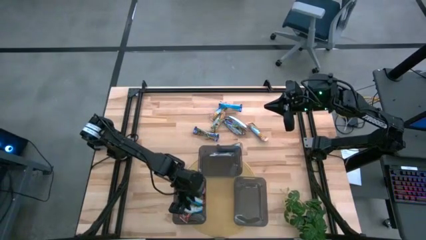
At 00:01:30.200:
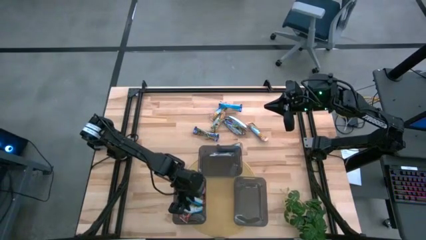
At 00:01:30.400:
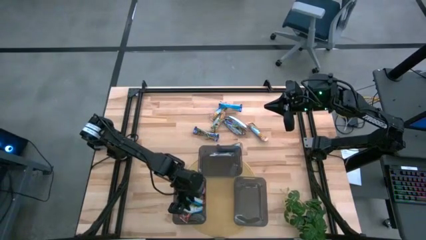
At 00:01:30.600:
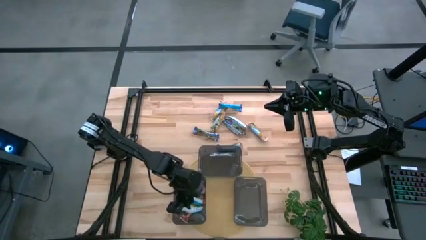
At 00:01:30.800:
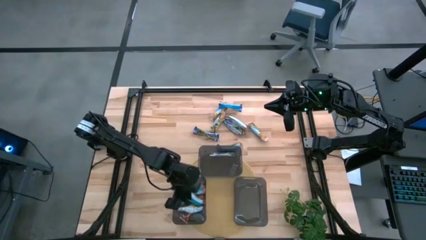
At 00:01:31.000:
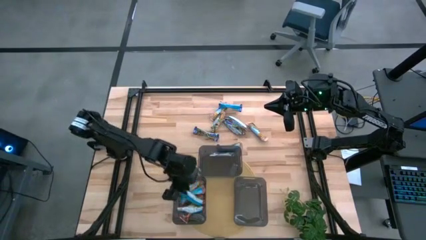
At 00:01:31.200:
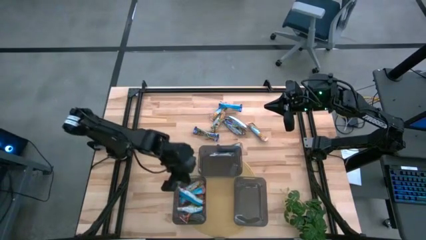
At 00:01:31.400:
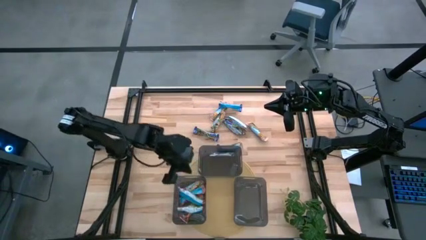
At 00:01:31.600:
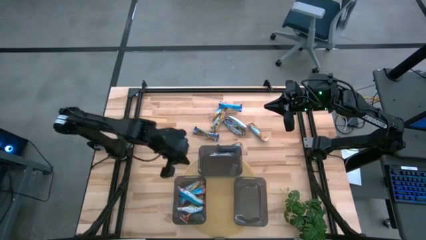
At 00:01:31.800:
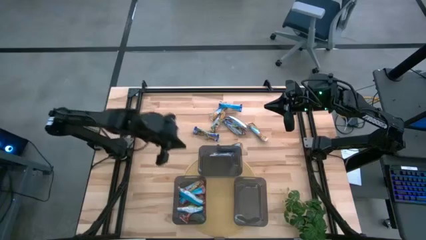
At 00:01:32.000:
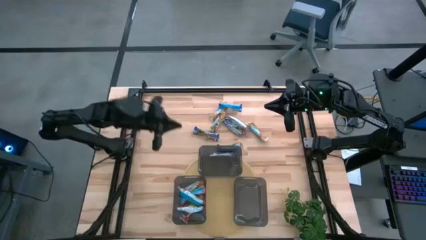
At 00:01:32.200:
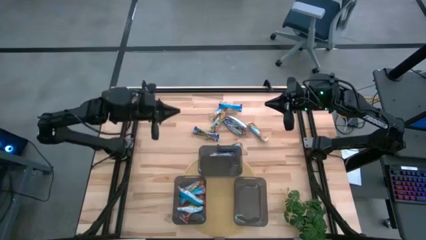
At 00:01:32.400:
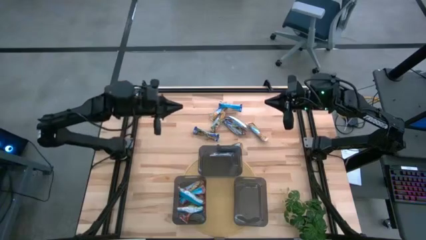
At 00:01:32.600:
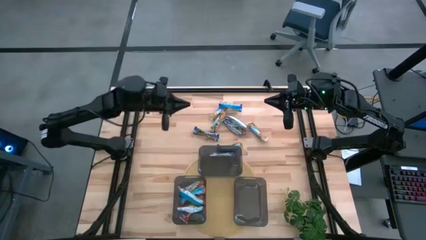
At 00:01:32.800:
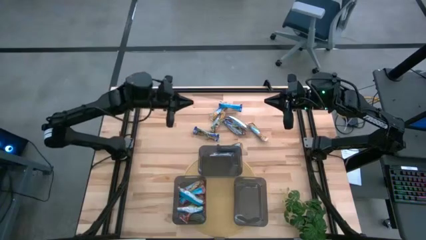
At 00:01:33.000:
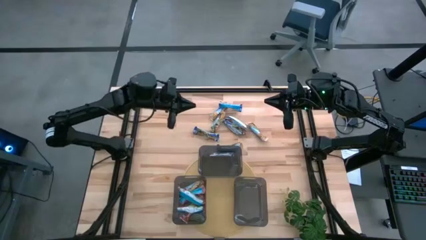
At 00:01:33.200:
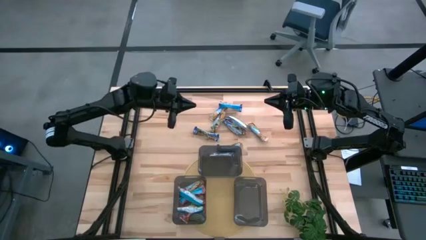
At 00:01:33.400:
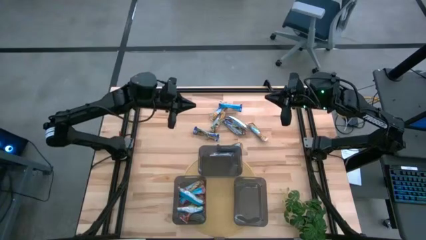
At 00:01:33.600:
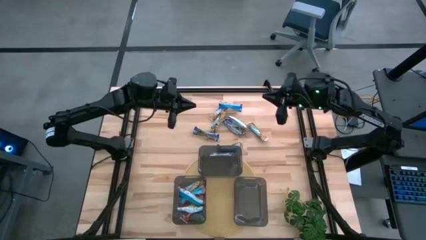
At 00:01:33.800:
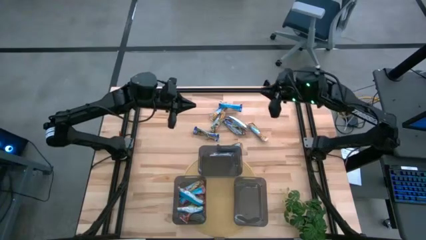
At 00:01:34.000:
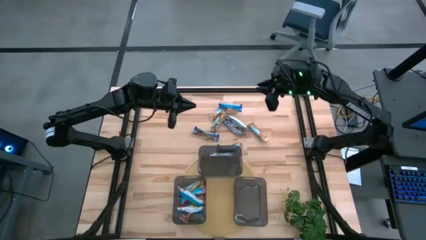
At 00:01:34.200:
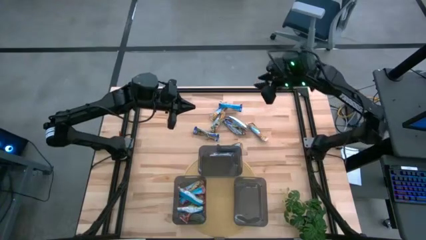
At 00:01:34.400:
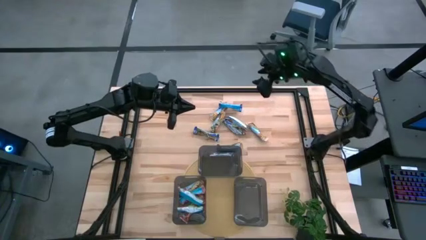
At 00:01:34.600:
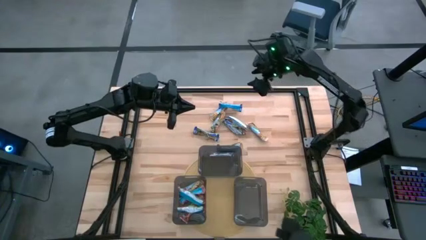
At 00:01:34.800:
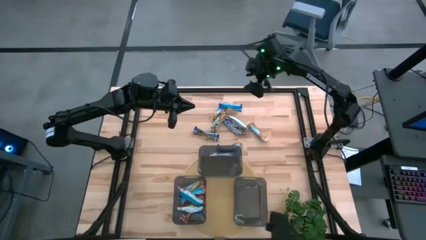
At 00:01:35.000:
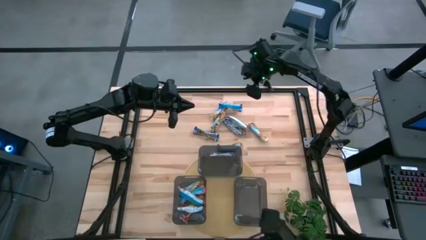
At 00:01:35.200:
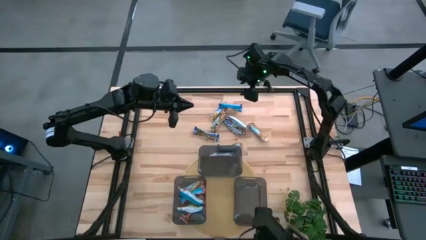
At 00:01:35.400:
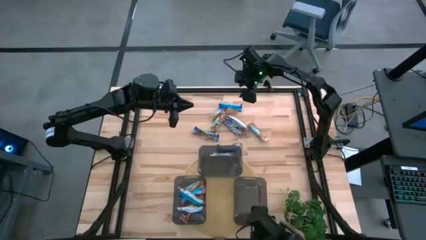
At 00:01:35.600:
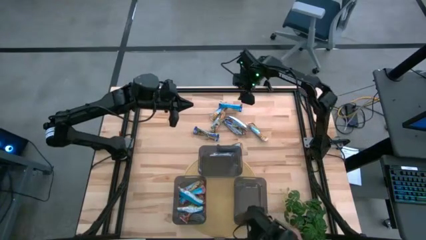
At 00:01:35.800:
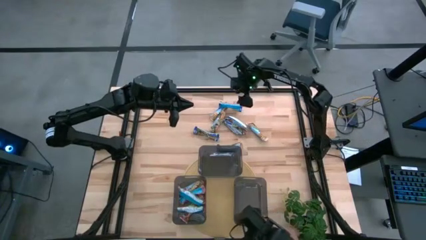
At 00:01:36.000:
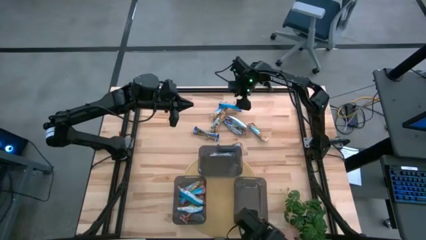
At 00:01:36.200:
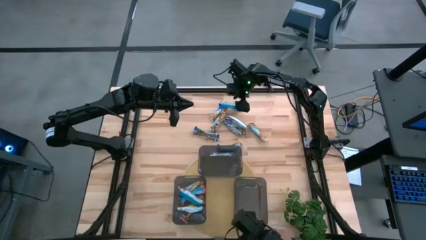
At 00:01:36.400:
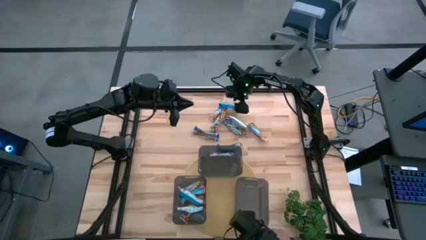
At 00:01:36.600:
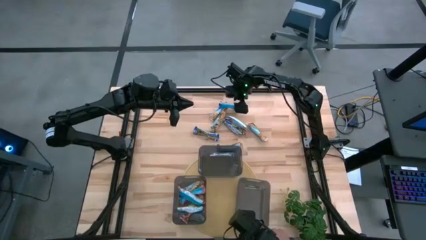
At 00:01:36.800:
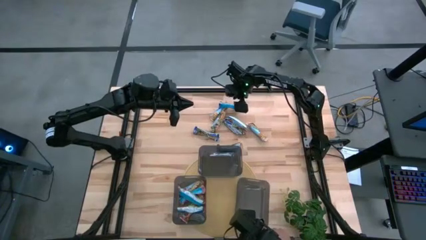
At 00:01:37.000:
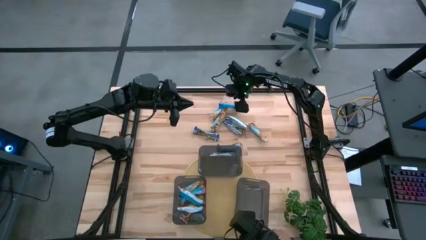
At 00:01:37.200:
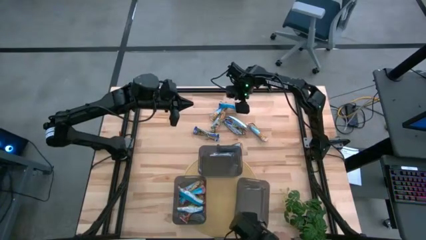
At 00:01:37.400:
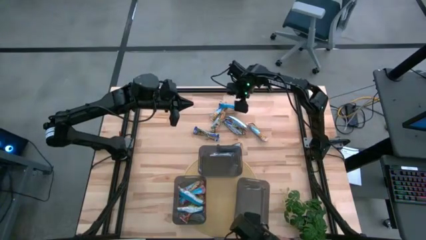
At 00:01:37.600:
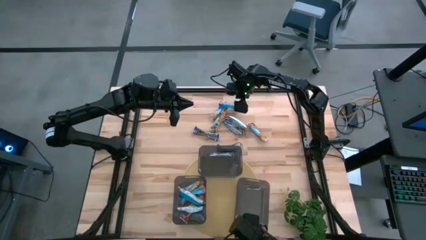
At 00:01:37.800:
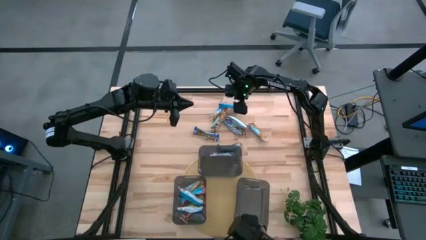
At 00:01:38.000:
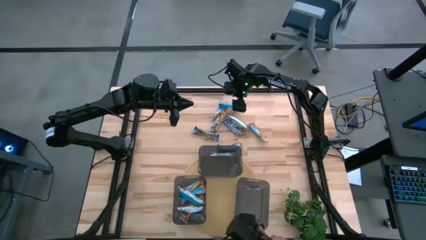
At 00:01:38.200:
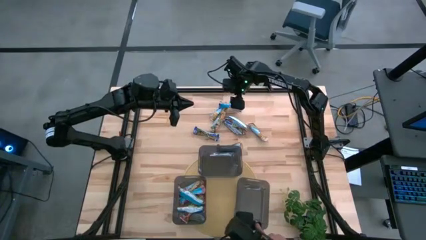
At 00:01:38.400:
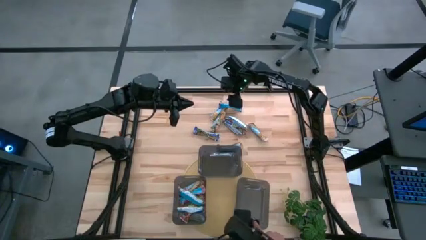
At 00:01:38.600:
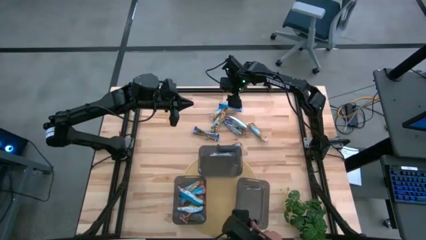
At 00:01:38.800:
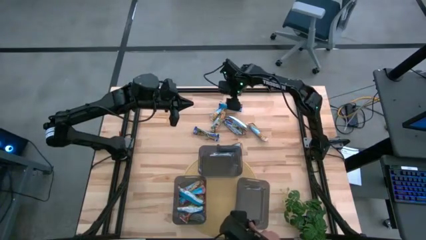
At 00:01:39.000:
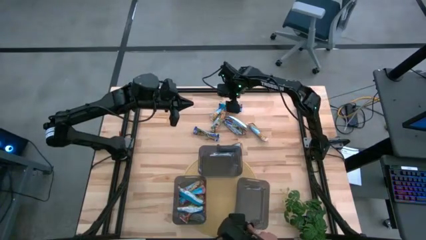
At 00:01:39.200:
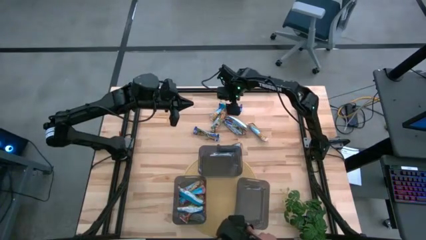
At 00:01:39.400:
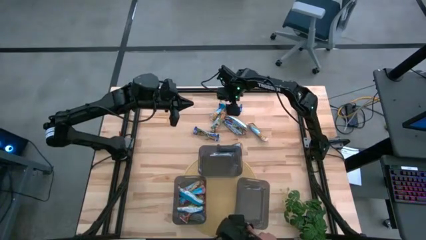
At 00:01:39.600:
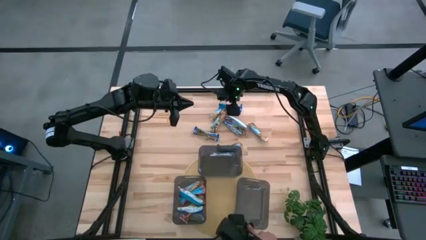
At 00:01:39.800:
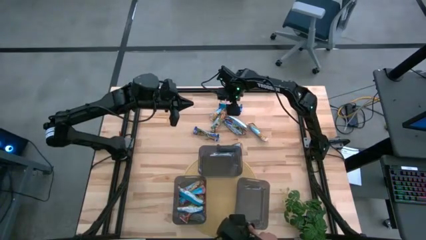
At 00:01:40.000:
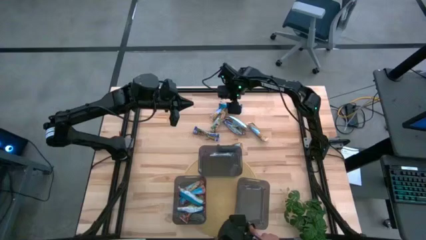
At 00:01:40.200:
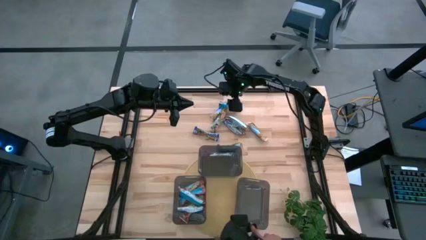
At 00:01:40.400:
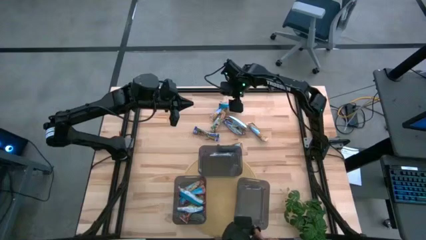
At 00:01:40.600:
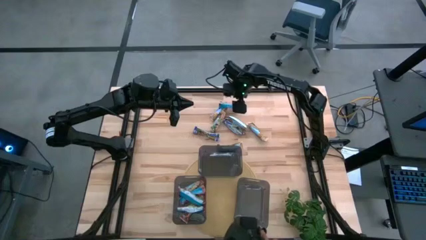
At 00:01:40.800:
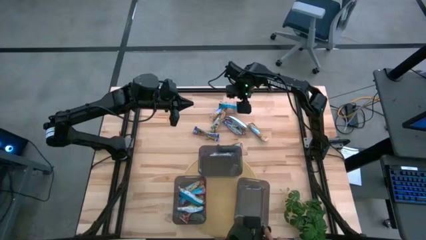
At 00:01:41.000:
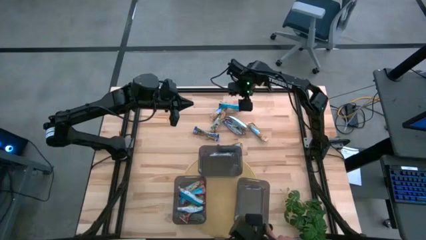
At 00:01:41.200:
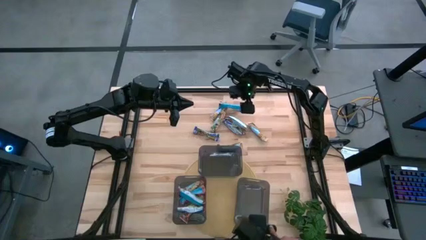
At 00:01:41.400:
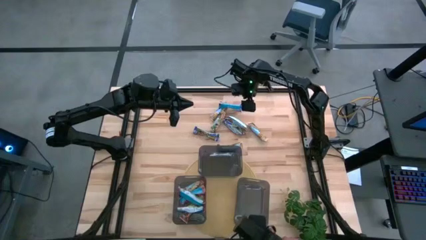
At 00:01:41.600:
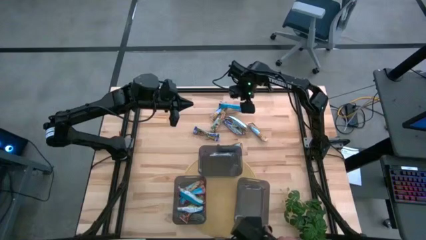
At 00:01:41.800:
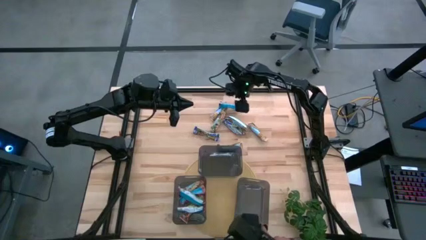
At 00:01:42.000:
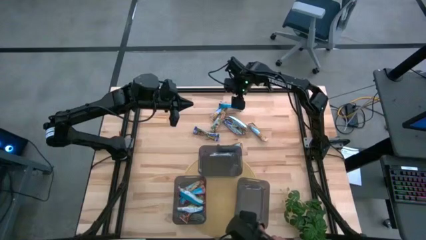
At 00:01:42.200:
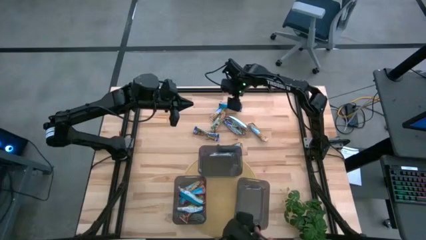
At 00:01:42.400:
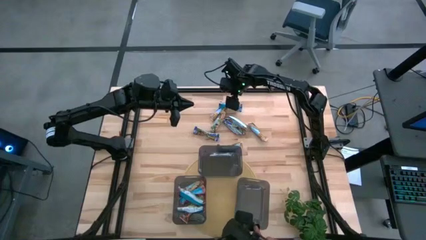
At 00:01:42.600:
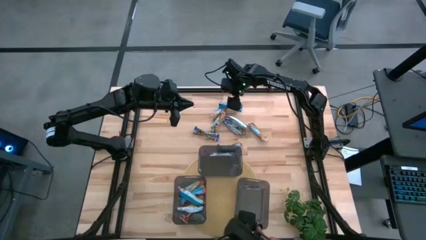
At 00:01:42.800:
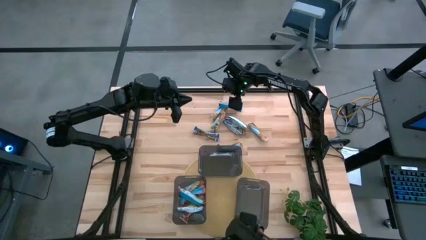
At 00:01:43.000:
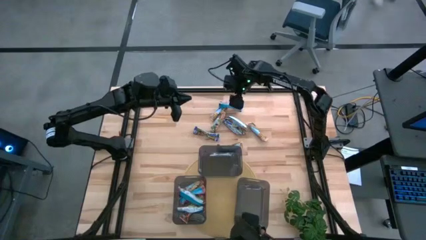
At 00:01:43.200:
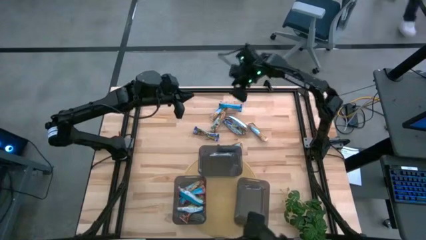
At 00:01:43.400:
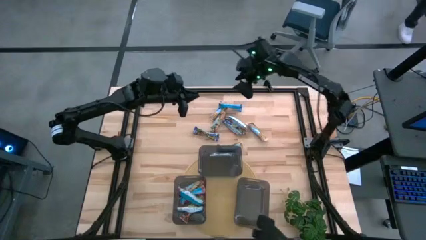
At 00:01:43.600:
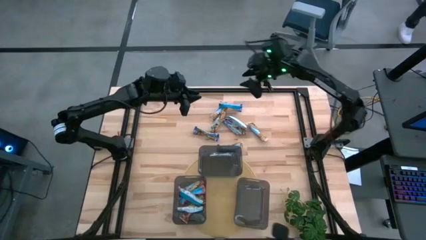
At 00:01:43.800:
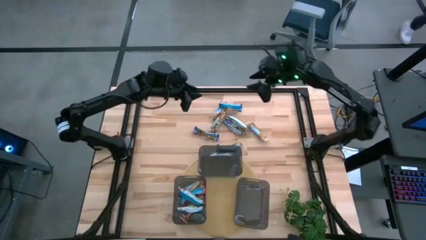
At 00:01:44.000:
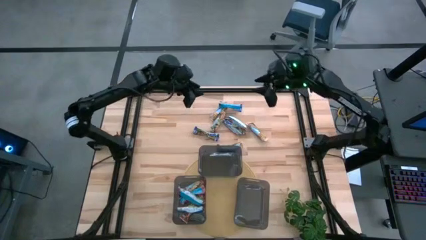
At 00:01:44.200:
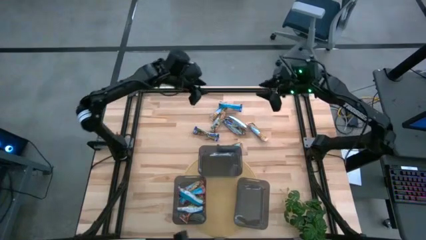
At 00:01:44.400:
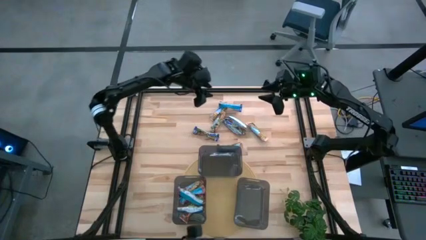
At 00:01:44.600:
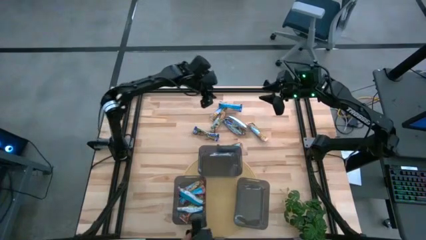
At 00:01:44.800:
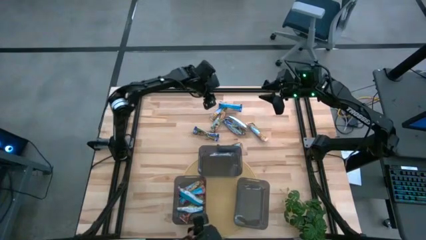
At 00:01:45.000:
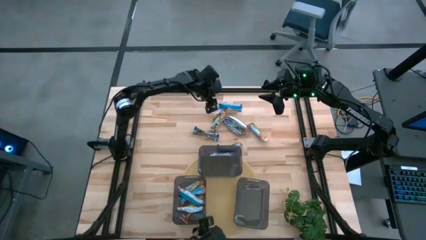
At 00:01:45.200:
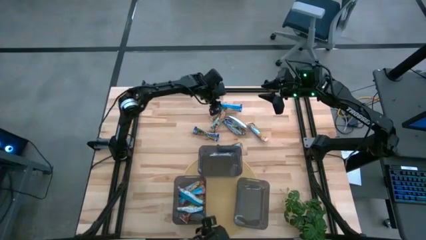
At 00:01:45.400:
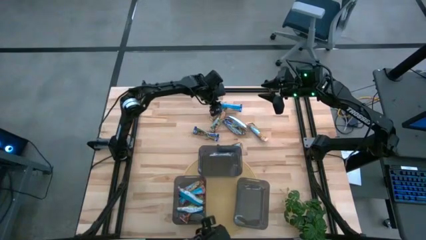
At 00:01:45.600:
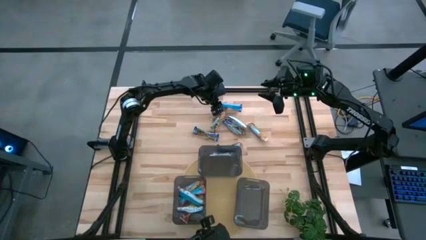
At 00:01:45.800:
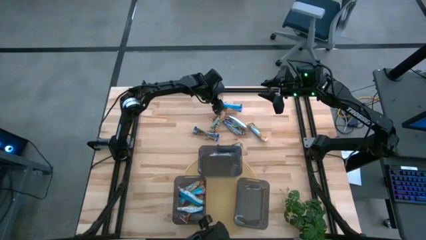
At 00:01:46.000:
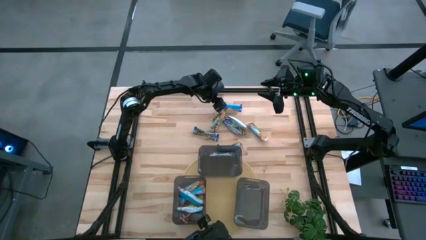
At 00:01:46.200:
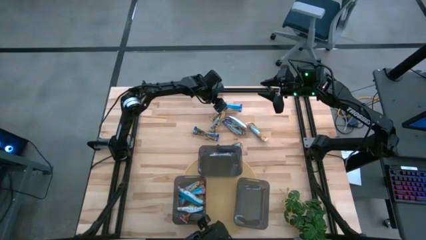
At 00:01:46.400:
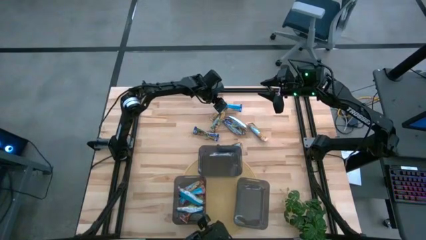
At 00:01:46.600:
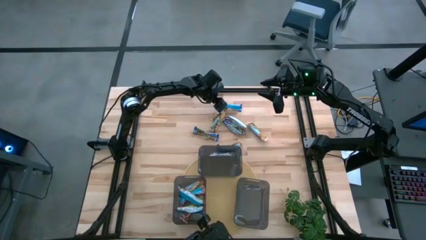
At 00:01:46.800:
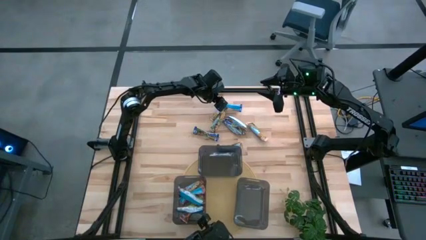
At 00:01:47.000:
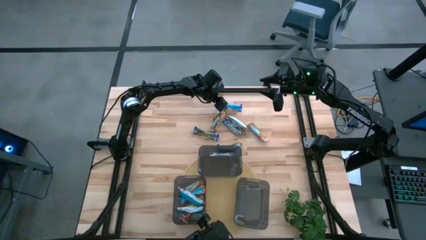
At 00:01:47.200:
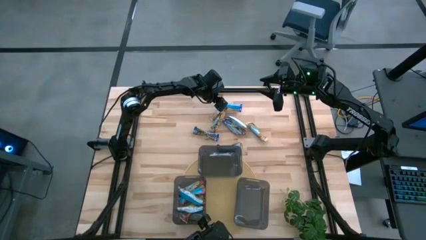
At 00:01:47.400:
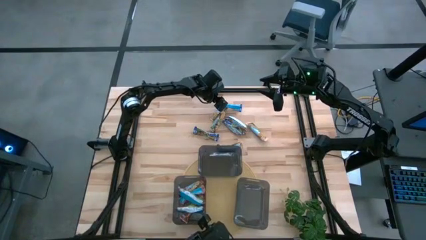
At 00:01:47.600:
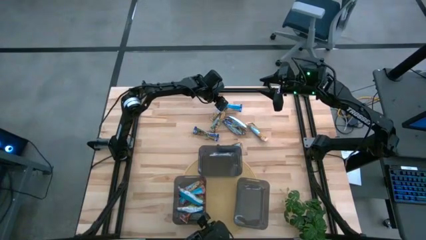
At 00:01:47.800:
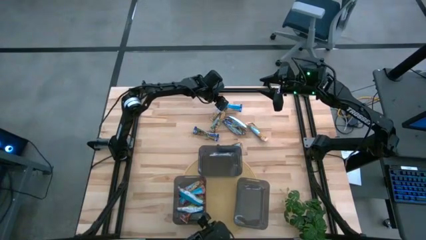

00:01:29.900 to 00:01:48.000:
Task: Pick and place Granola Bars by type
Adjust the blue granola bar on the table
